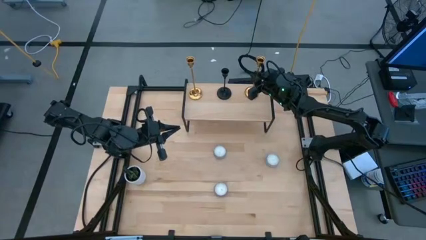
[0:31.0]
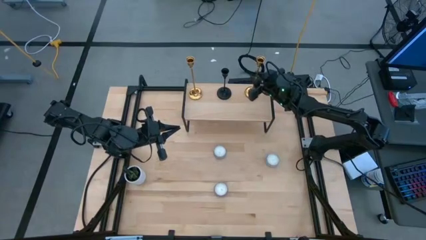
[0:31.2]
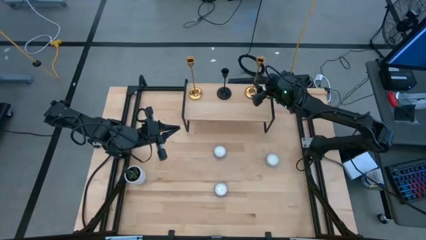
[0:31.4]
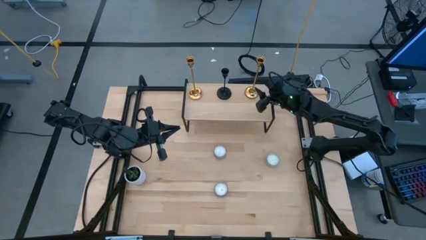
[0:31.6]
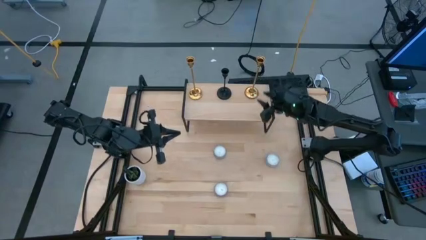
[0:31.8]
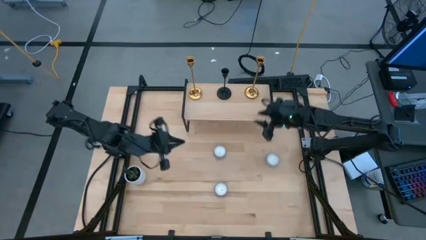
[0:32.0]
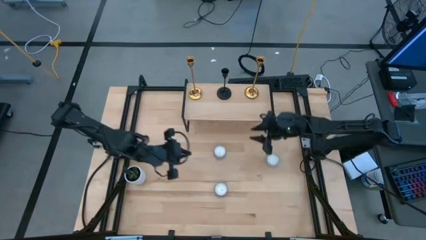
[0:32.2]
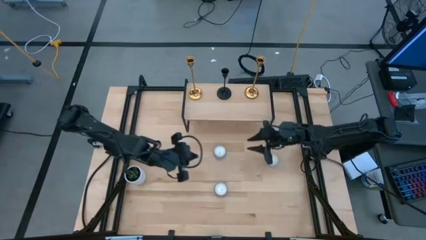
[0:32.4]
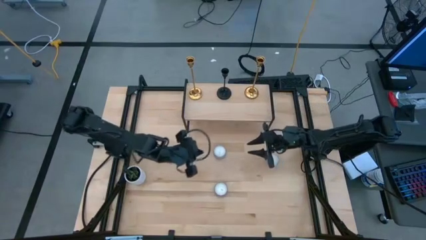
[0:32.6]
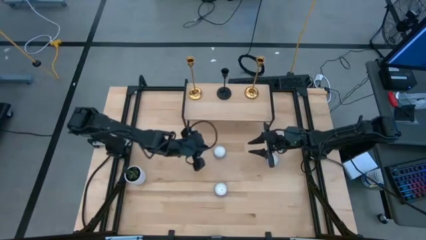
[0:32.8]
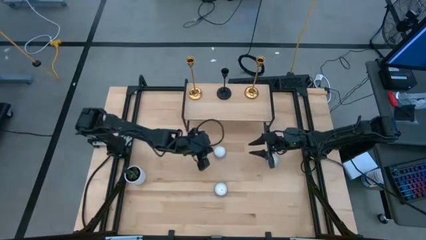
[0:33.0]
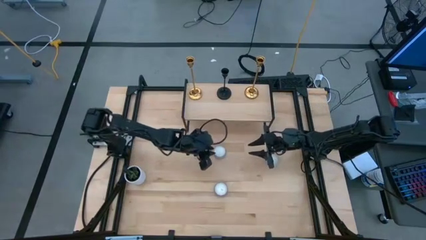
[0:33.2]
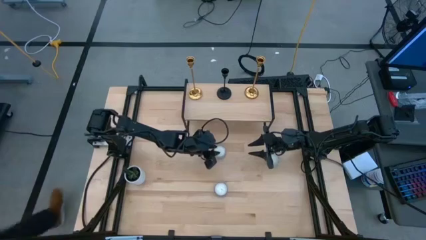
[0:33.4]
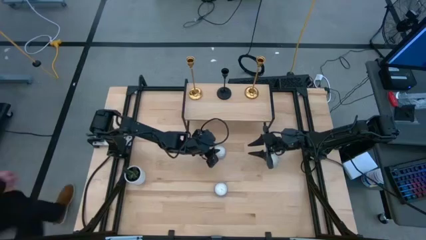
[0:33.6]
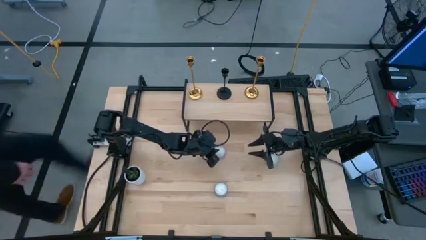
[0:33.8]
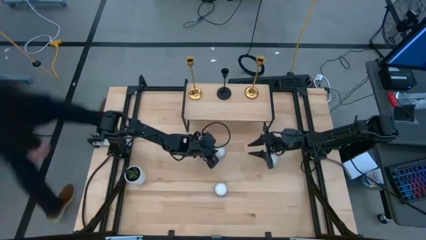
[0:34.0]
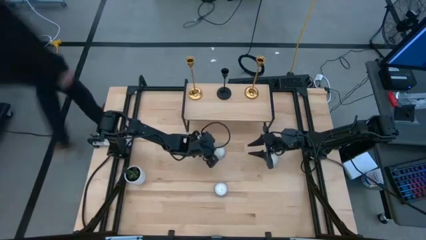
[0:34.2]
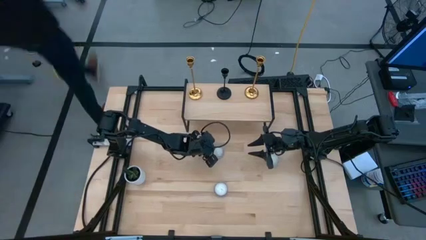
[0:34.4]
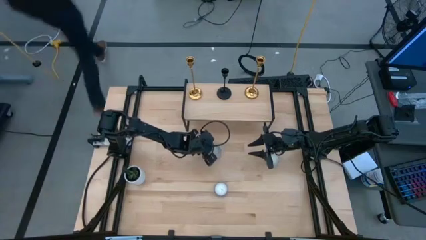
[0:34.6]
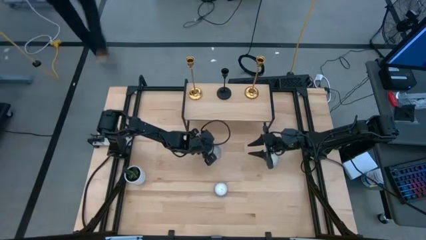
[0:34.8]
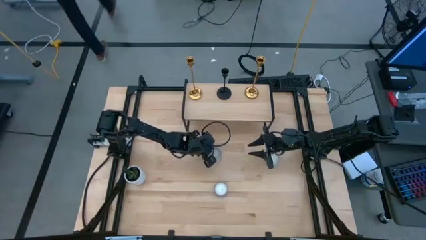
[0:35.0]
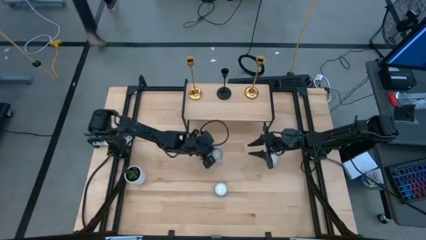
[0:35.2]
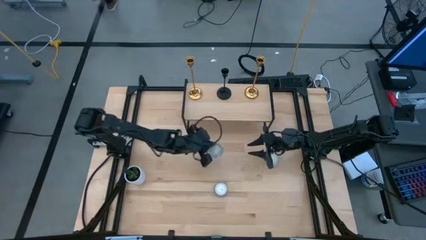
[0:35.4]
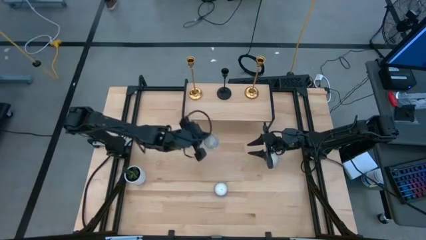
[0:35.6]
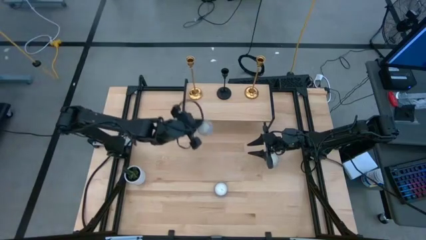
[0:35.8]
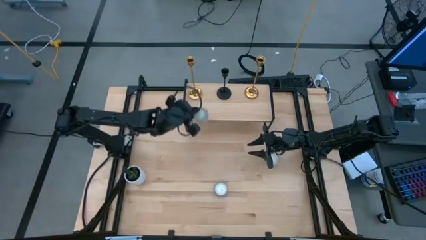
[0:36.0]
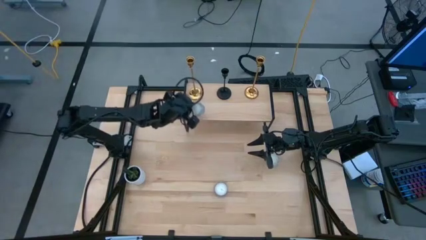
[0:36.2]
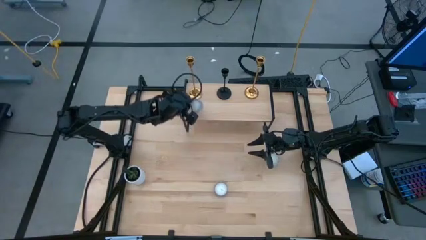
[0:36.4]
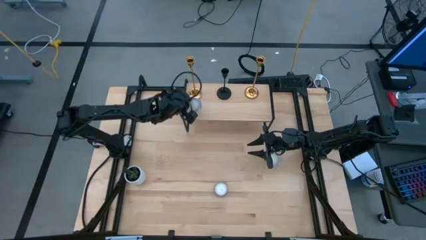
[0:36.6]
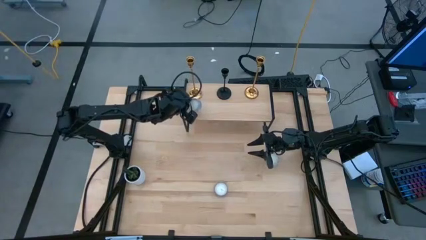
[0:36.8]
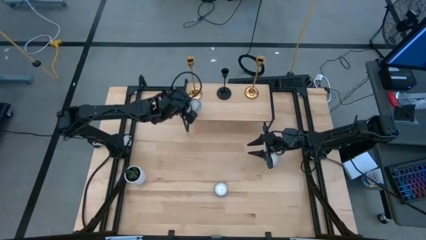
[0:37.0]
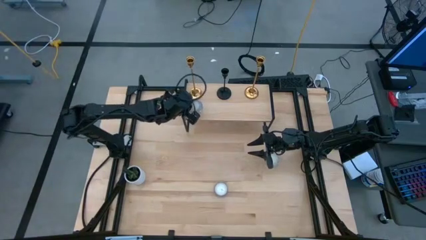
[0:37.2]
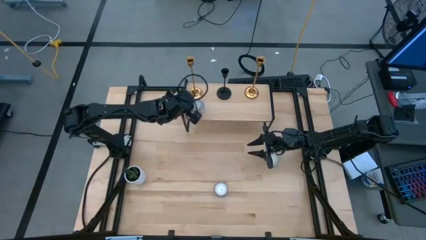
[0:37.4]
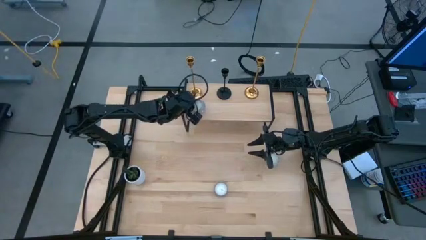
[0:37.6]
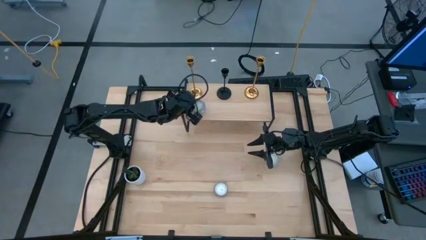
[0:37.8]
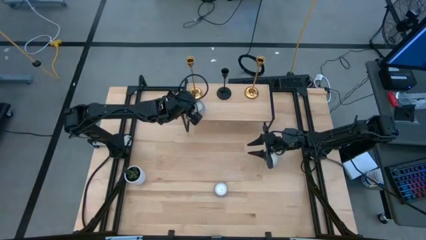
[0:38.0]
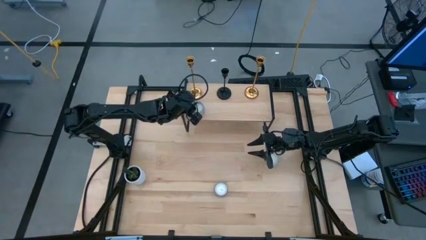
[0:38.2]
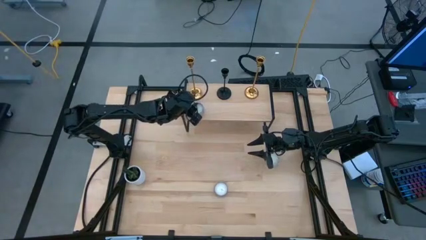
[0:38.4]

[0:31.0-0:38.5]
Task: Pick & Place candle stick holders
Put the blue scented candle on the shelf aligned with the golden candle holder

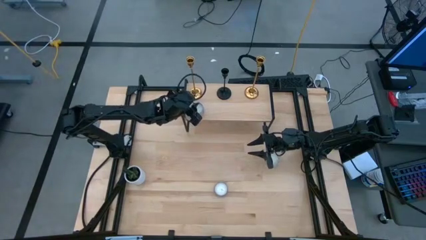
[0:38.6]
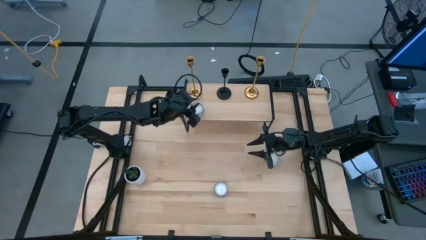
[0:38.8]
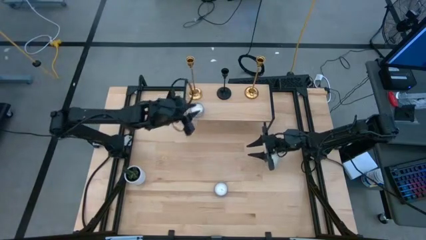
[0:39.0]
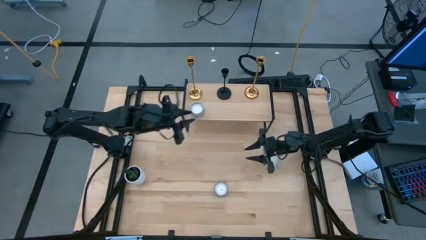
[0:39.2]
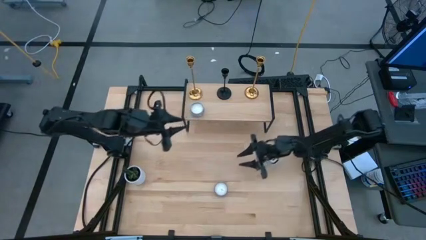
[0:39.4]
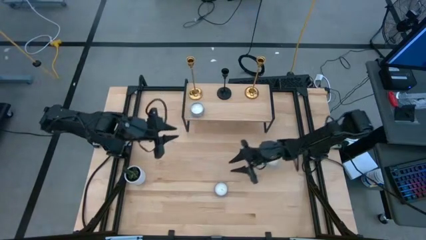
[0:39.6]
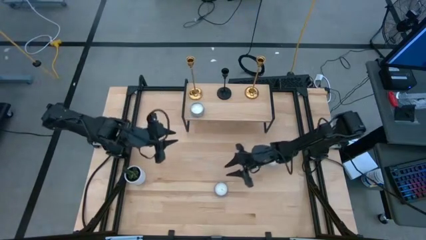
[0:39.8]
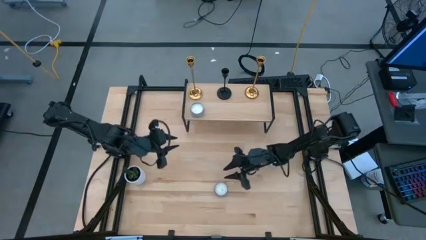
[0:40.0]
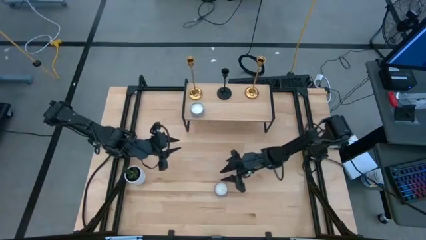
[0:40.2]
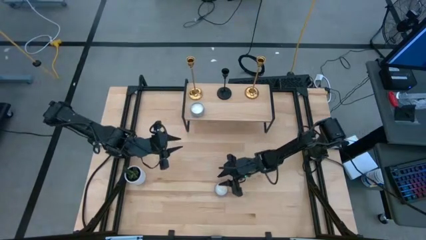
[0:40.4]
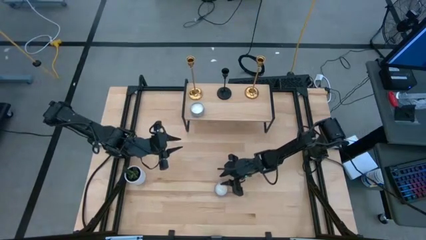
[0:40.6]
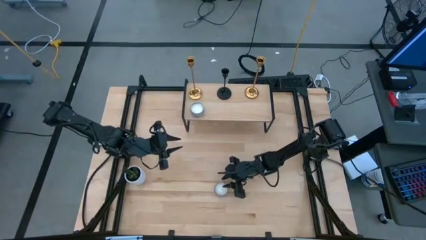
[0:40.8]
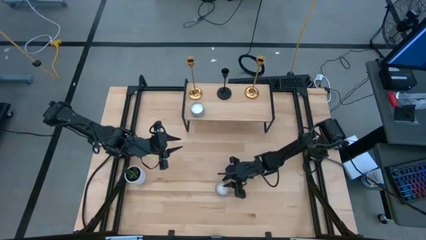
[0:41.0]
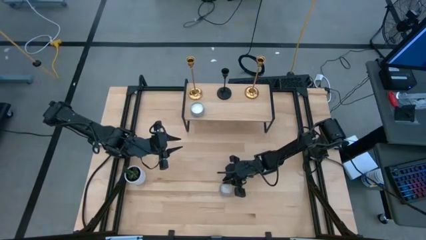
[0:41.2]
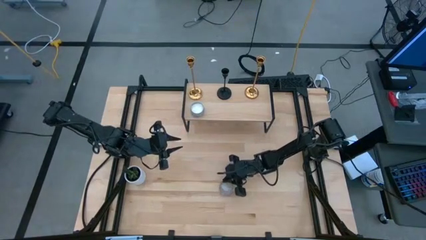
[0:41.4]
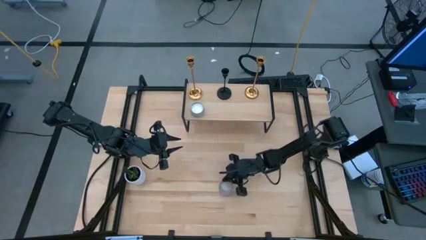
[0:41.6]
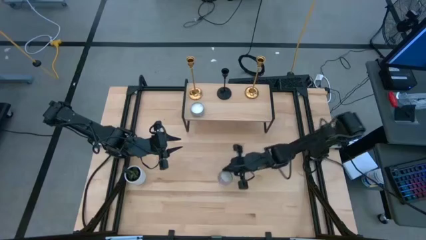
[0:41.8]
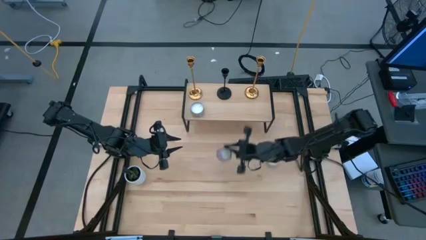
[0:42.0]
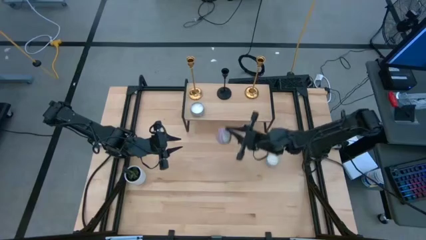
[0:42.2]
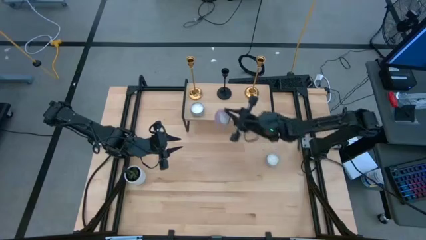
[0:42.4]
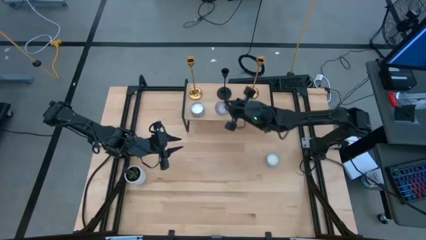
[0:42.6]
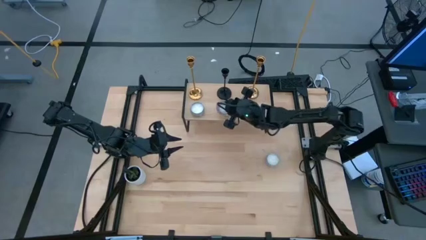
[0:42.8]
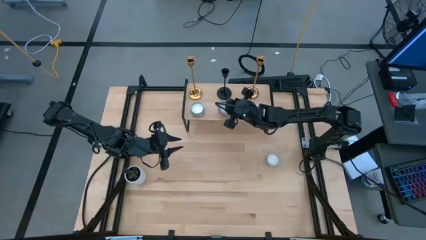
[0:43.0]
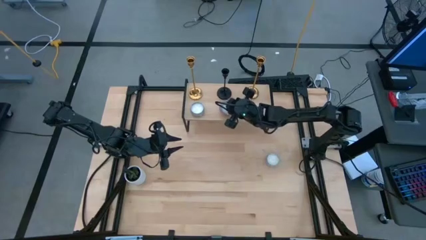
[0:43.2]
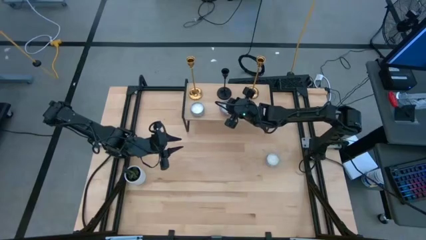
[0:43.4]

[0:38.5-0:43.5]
Put the purple scented candle on the shelf aligned with the black candle holder

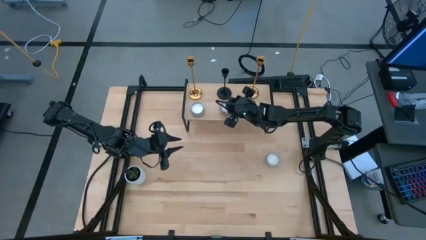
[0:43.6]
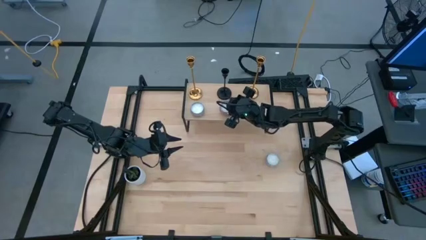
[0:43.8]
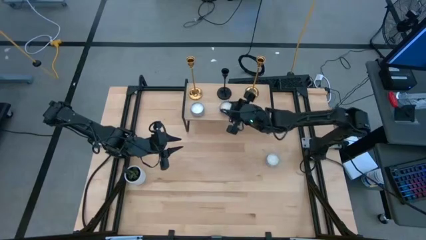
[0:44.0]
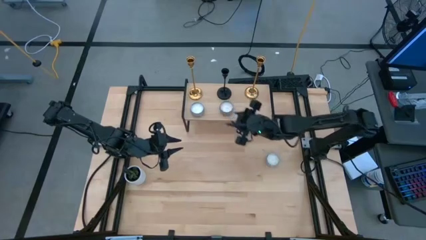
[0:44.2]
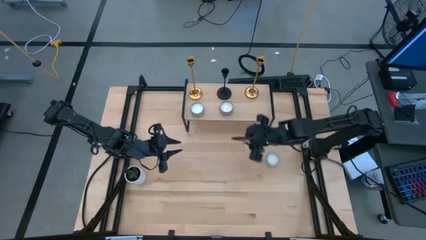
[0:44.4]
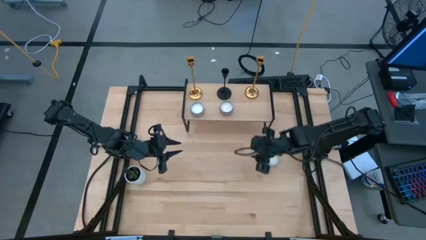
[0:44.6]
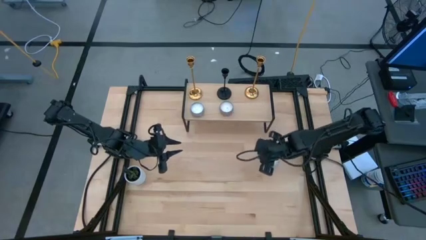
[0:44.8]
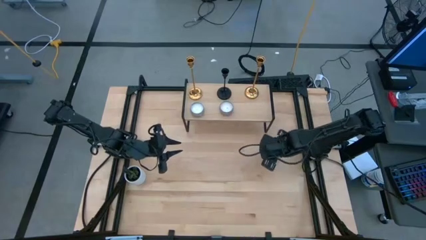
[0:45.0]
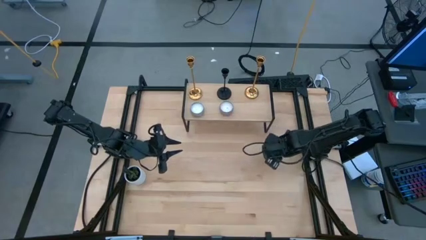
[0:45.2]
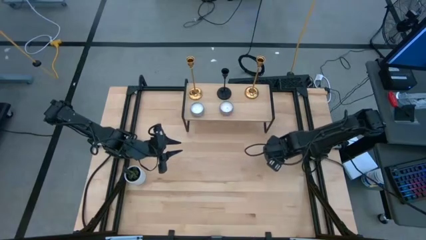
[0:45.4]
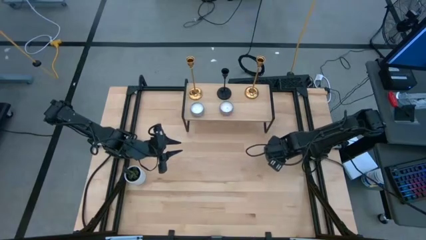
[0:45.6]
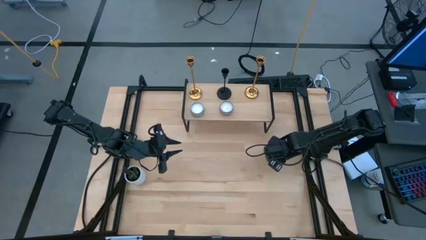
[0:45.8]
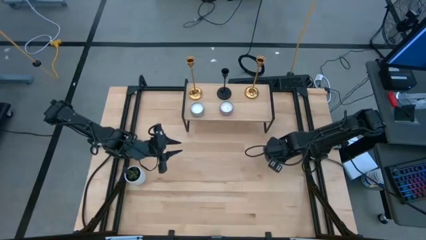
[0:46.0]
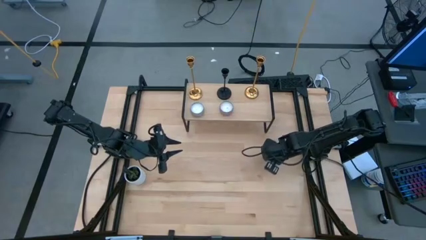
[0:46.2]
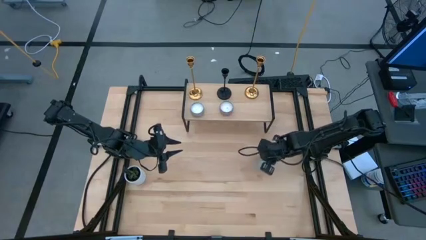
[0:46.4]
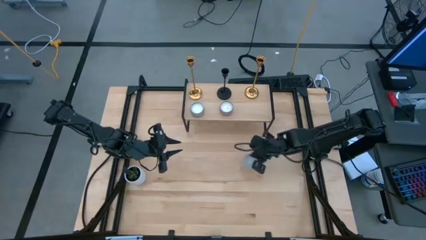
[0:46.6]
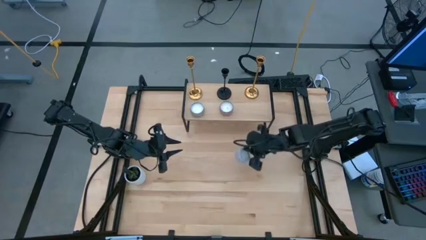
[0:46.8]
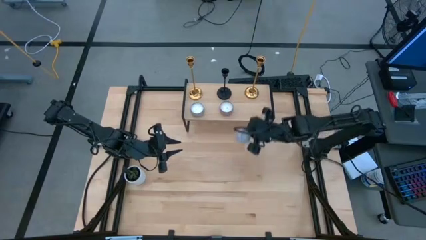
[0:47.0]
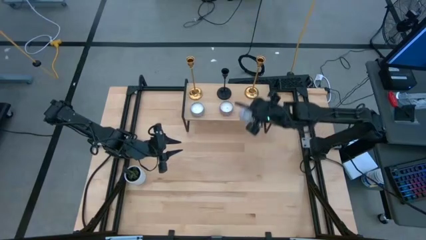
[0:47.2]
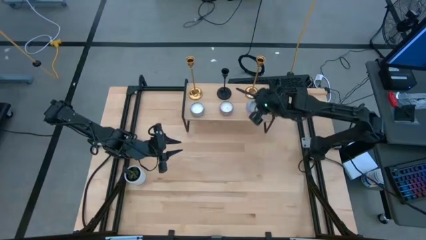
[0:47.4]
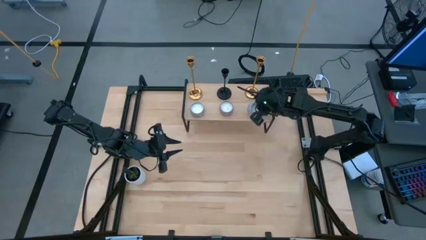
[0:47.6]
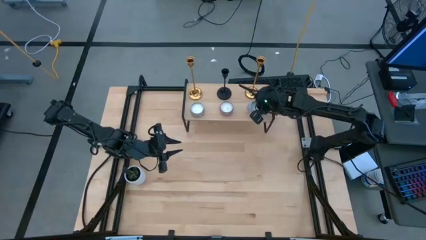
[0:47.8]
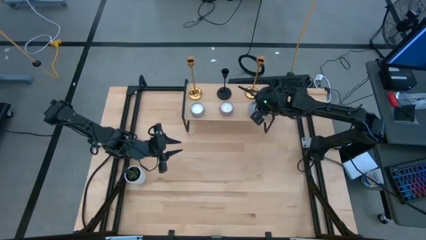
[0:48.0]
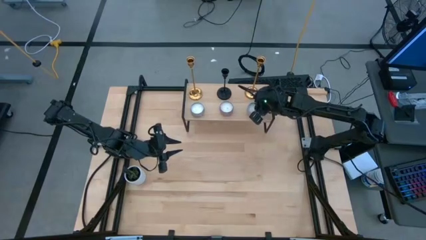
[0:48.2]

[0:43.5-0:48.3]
Put the white scented candle on the shelf aligned with the golden candle holder

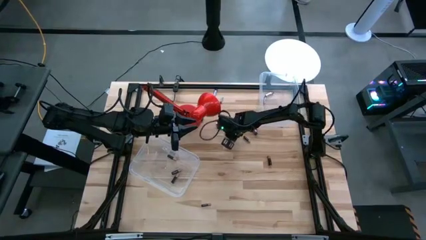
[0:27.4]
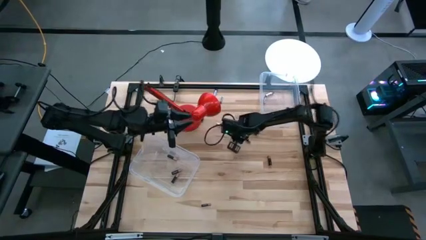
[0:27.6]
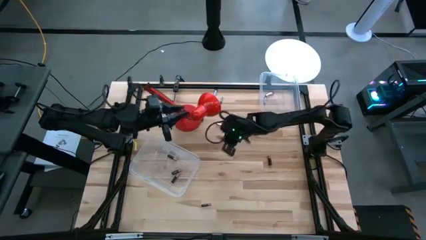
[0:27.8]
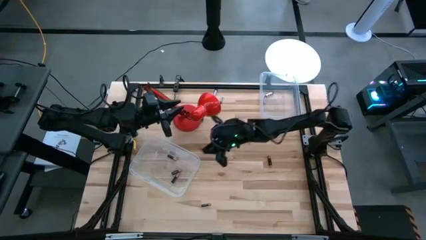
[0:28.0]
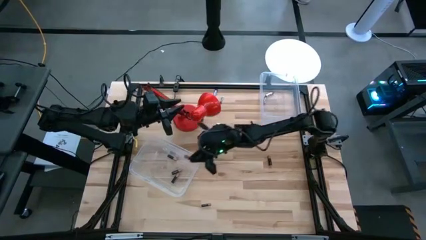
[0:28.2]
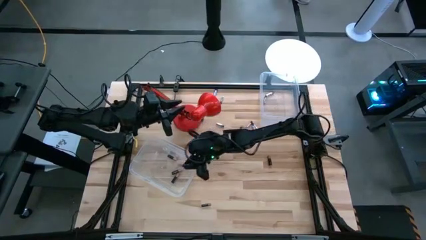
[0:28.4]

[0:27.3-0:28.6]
Task: Sort batteries
Put the black battery into the bottom transparent bin
